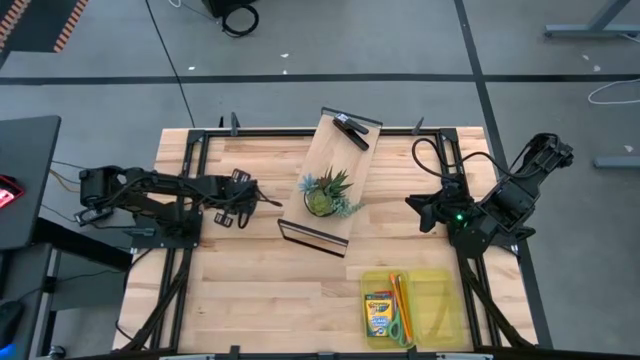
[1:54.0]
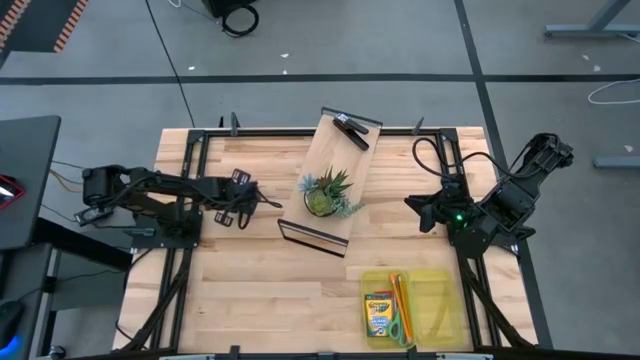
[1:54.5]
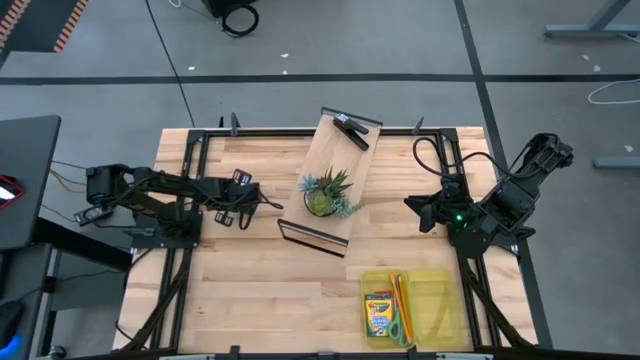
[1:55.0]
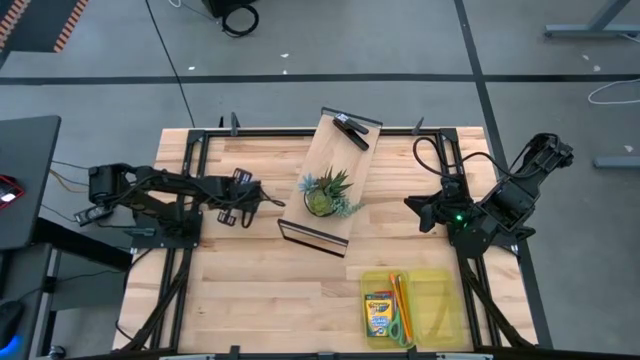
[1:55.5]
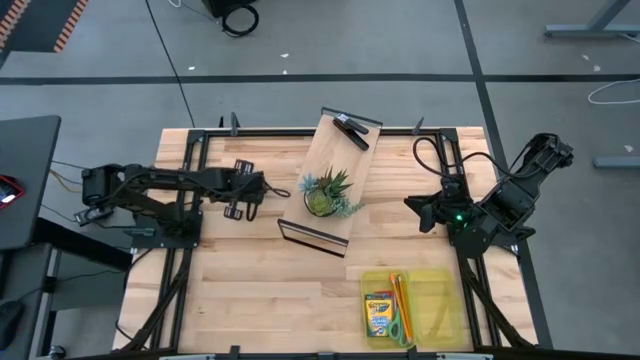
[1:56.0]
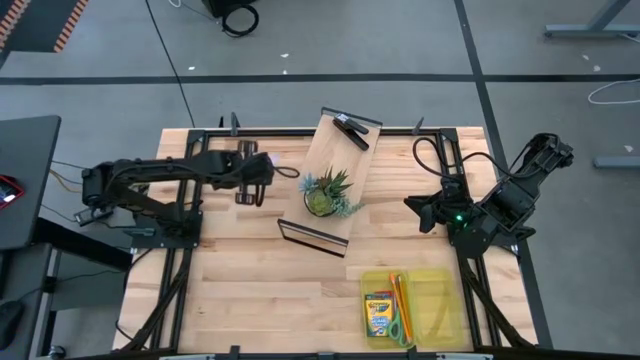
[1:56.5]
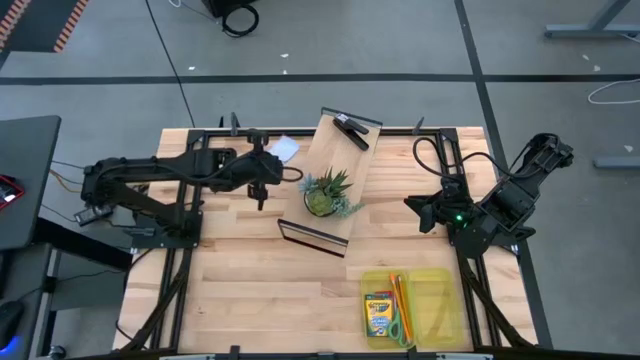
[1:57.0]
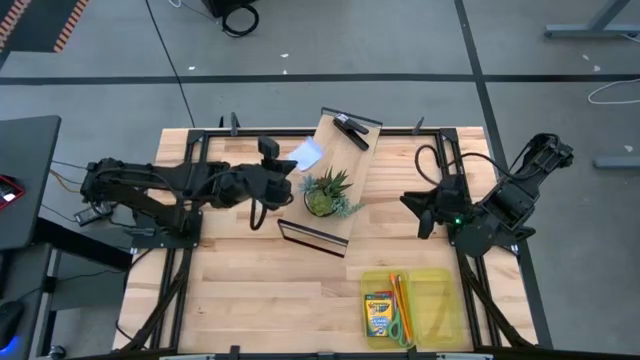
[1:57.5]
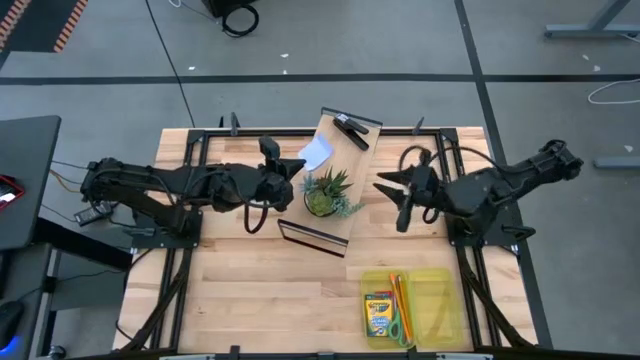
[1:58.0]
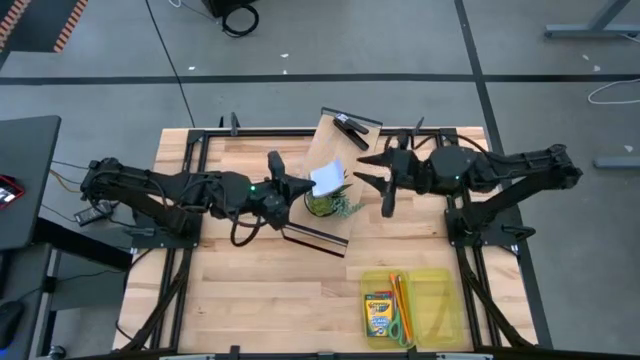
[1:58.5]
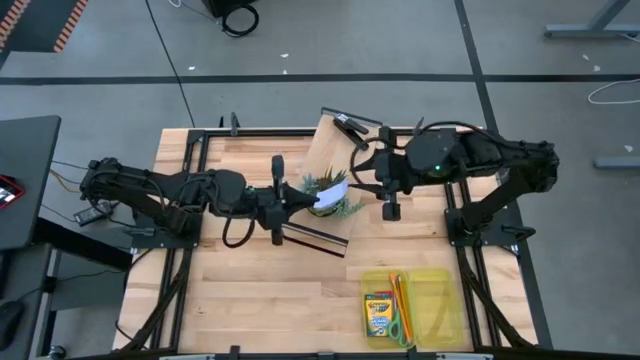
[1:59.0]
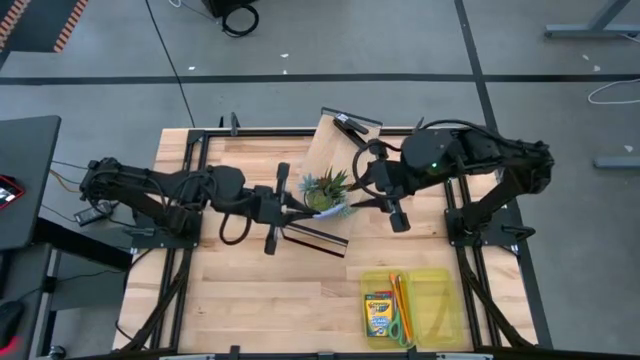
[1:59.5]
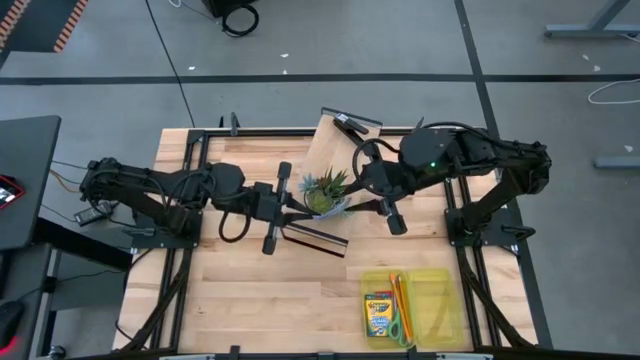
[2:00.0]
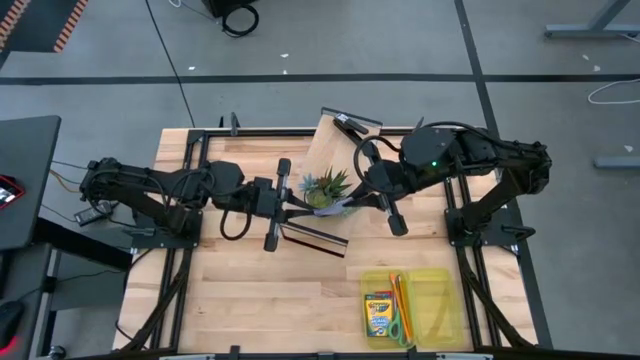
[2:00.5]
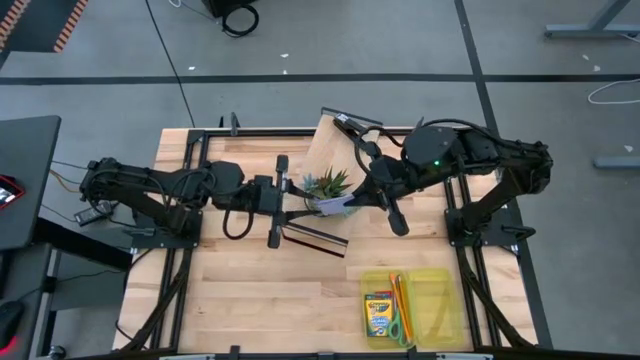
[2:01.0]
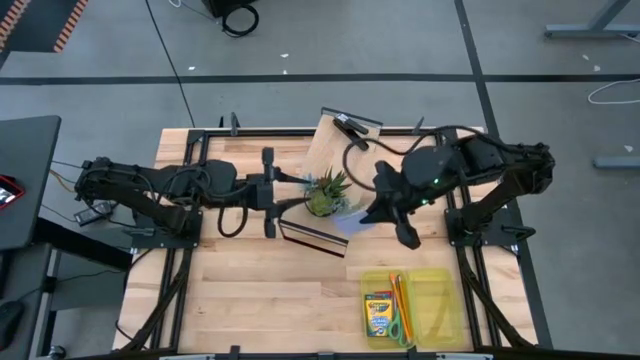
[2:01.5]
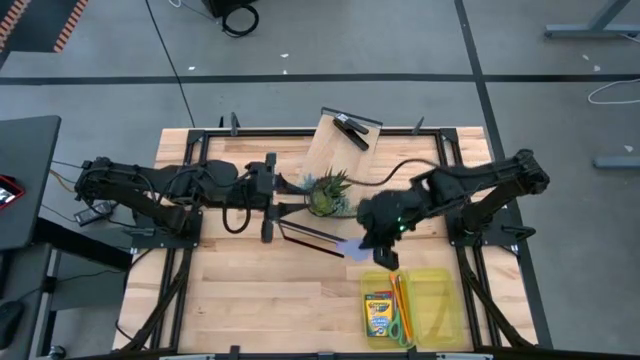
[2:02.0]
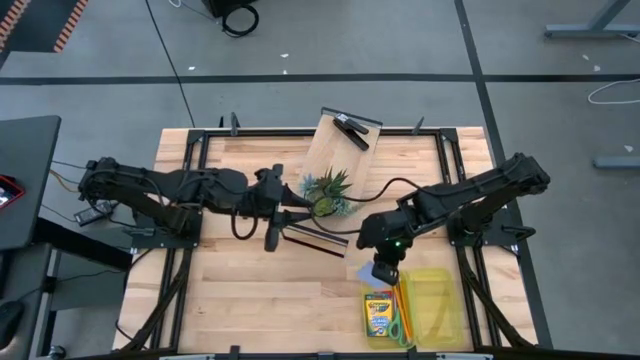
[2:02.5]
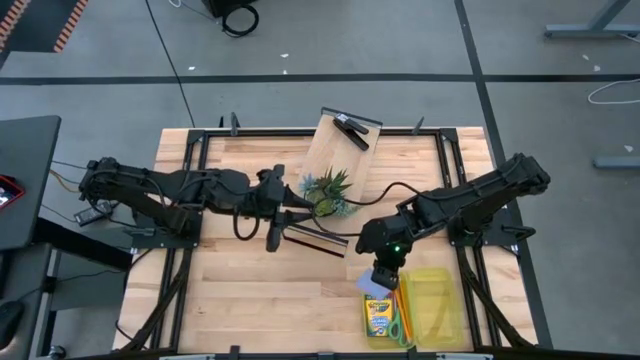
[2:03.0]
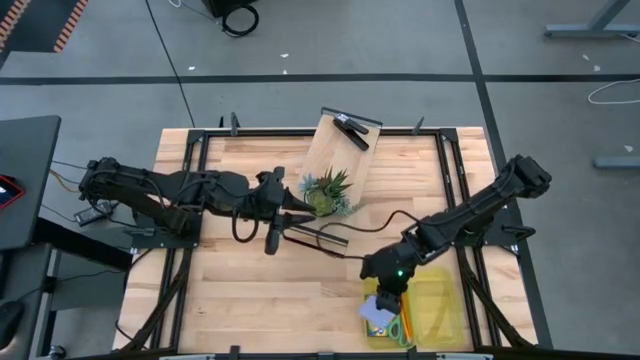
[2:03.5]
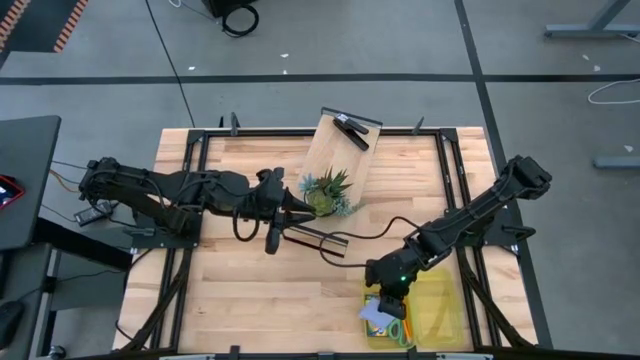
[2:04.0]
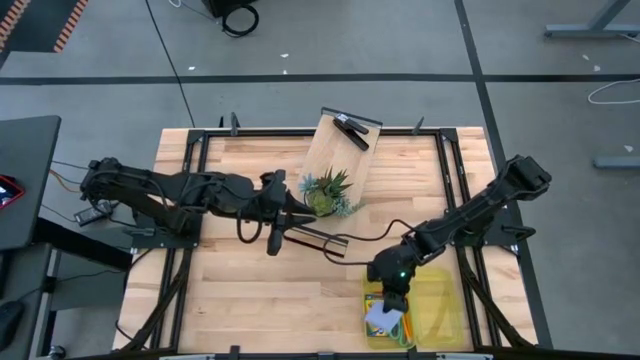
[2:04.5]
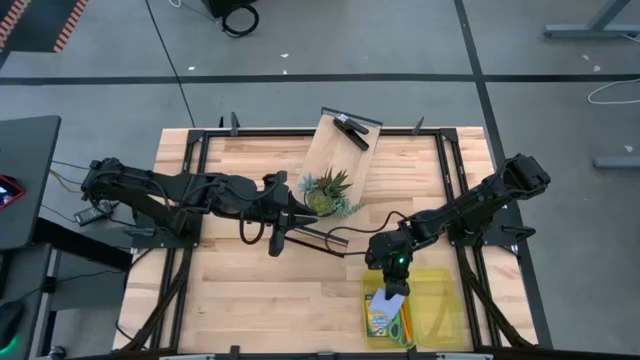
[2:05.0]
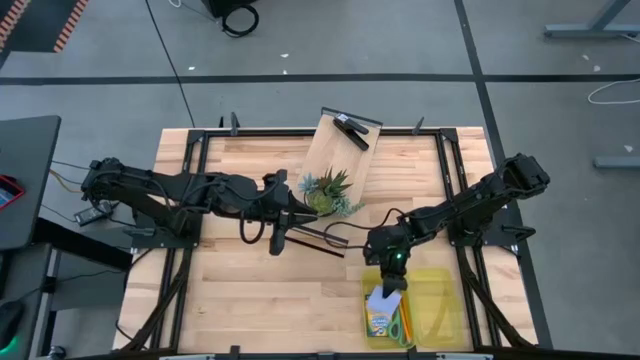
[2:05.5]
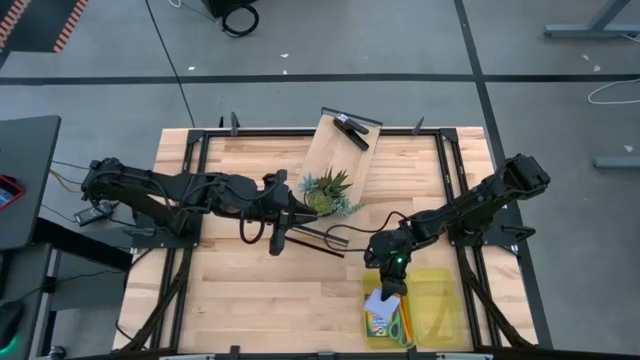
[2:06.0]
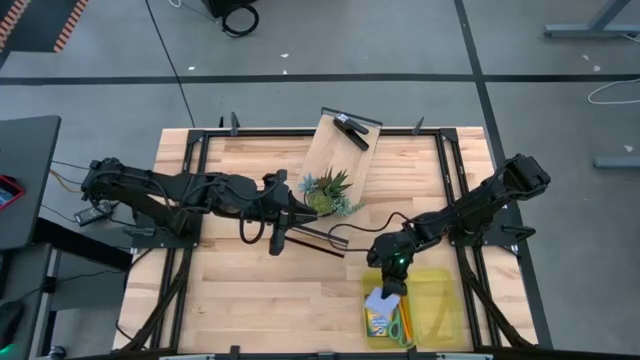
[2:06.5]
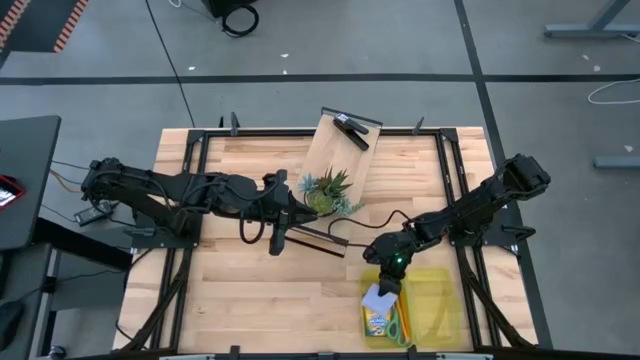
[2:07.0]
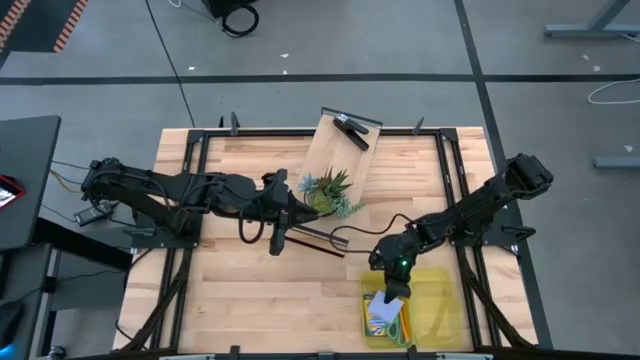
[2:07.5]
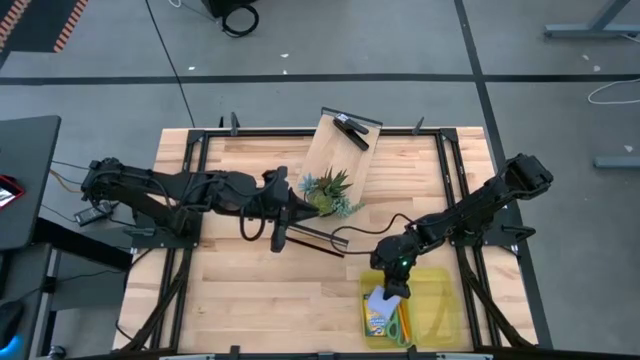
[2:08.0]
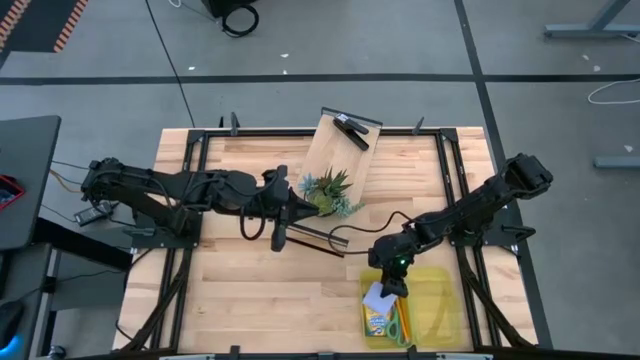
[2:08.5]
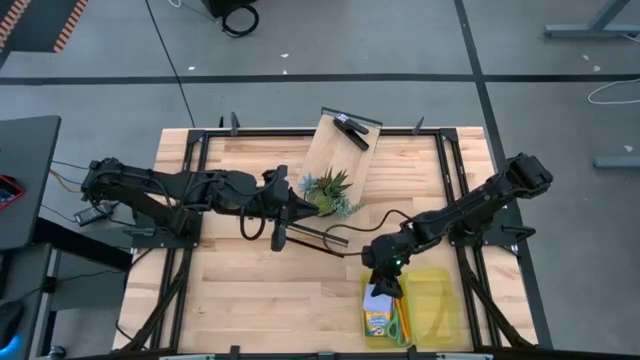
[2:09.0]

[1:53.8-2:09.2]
Task: Pack school essentials
Put the white sticky note into the yellow supply box

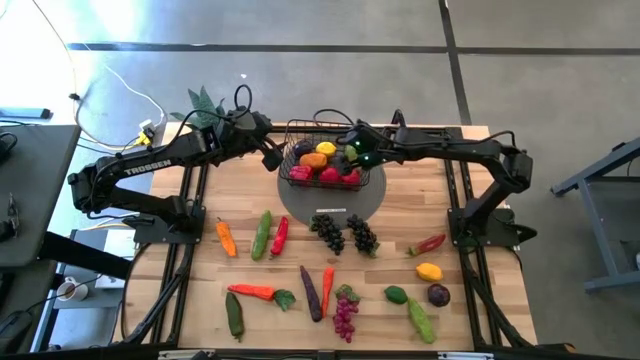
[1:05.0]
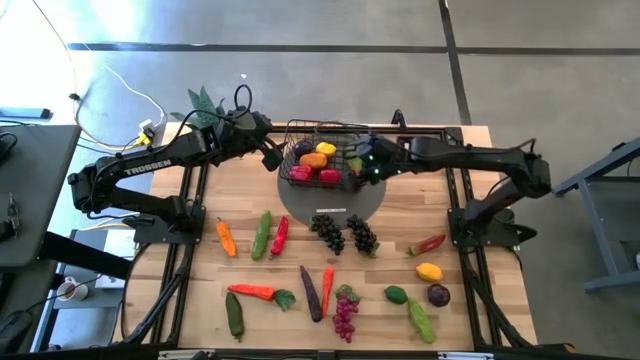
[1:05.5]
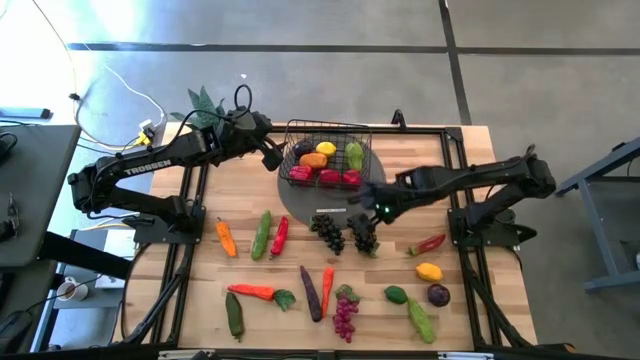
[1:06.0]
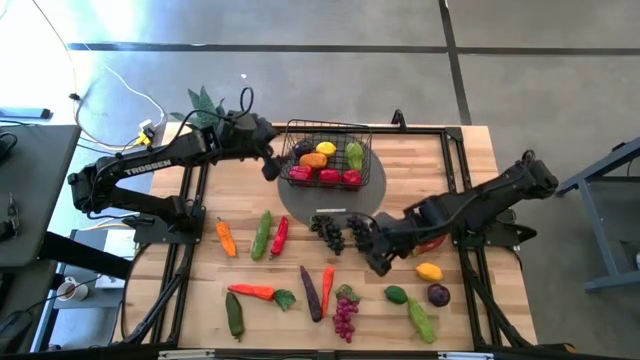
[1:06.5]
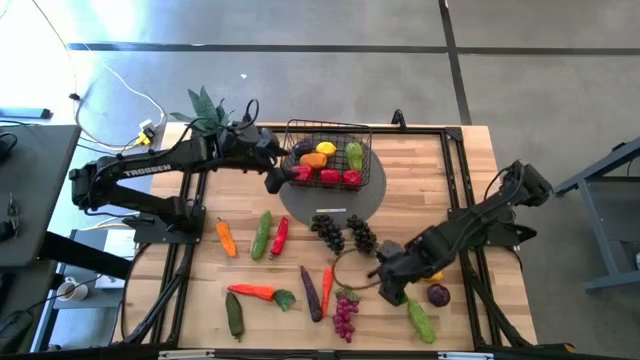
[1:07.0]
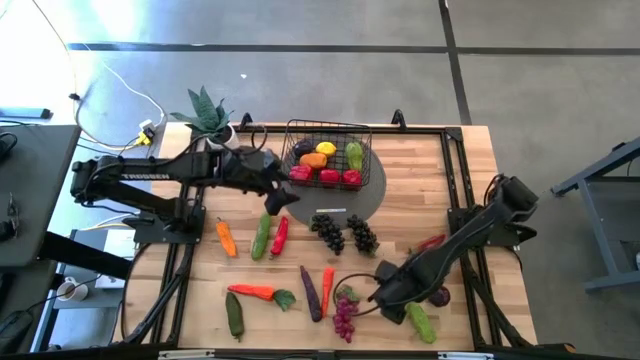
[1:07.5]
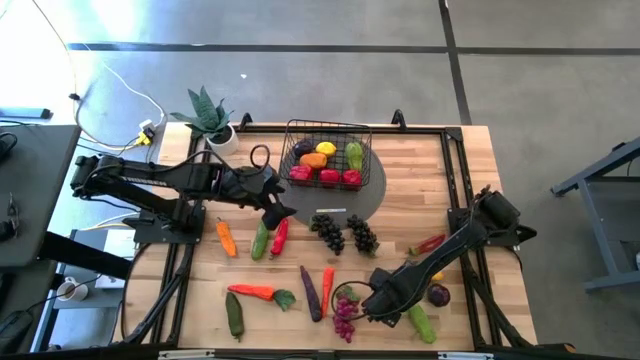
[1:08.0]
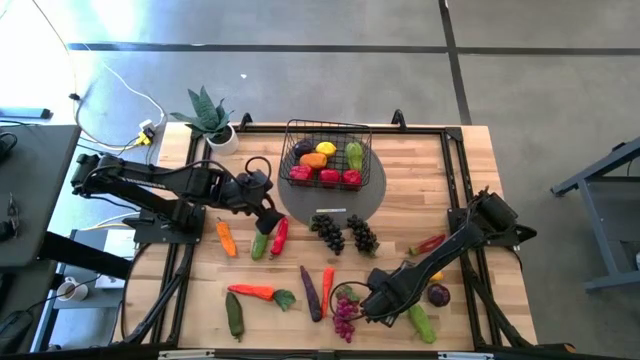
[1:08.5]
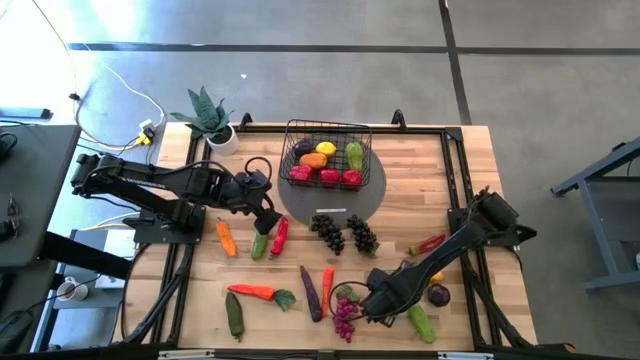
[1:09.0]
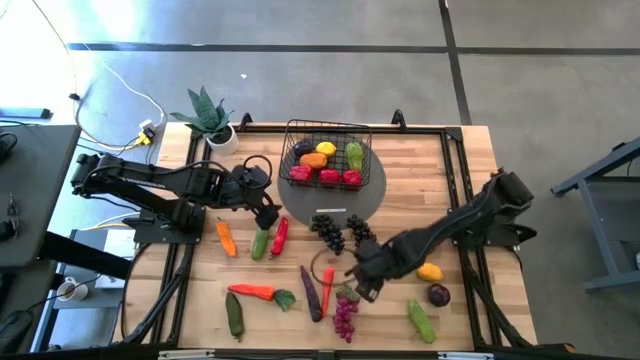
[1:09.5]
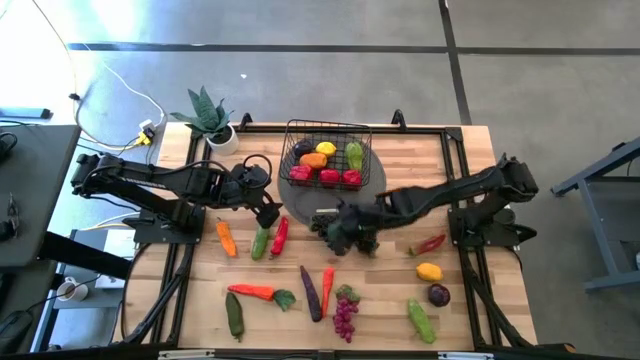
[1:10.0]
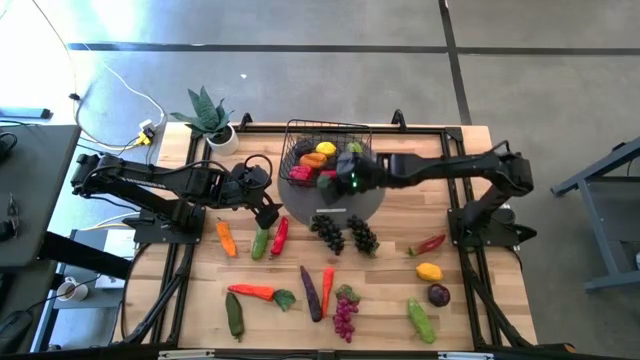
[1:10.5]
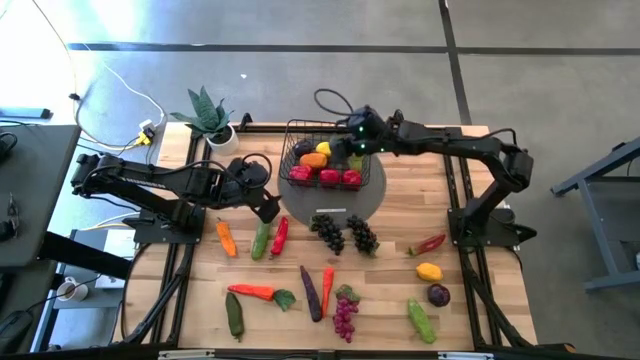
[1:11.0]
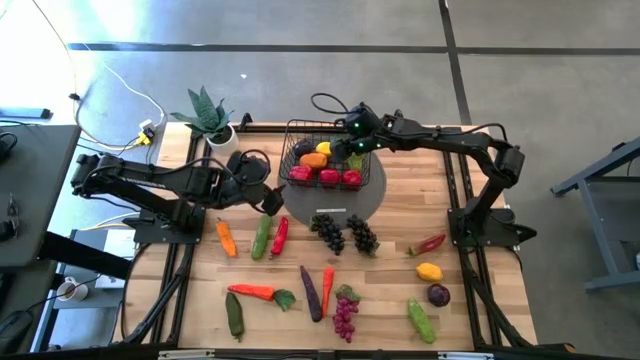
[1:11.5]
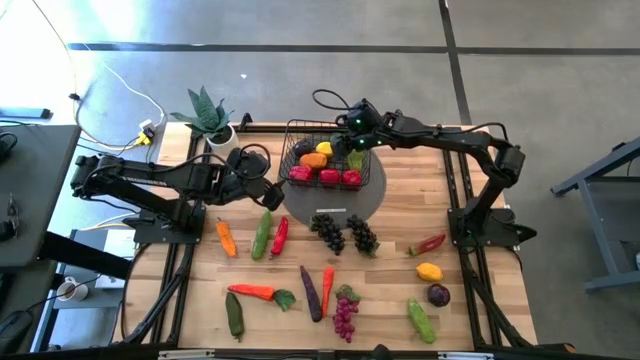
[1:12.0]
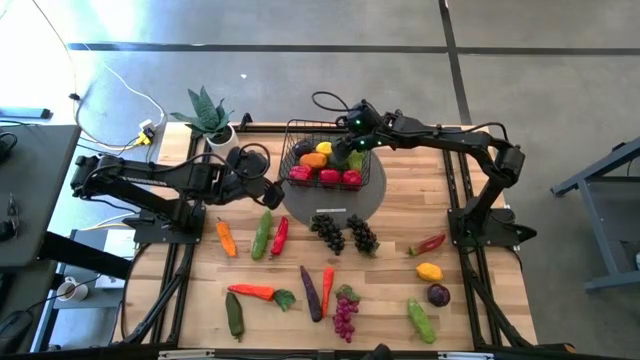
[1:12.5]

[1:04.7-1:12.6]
Task: Build produce basket
Put the green lime into the wire basket
